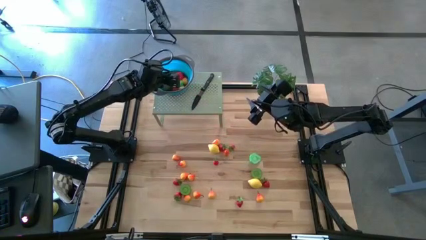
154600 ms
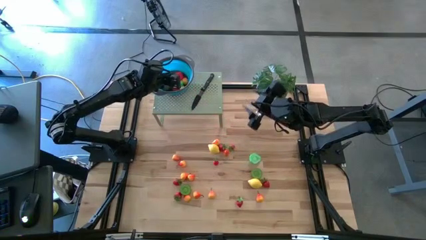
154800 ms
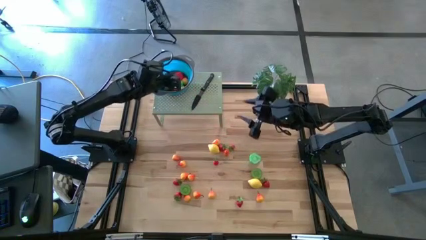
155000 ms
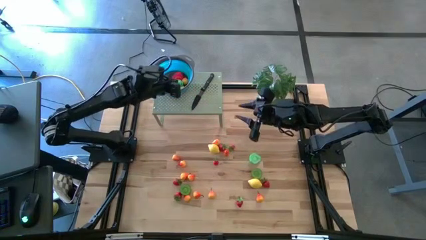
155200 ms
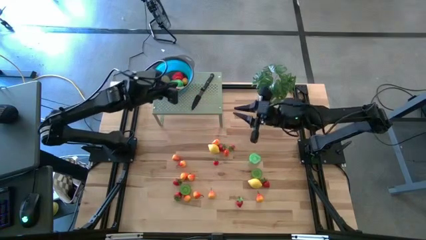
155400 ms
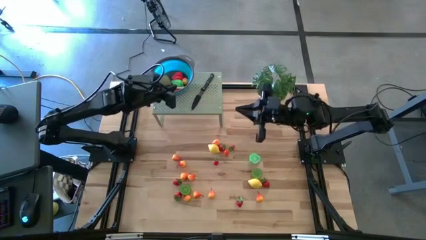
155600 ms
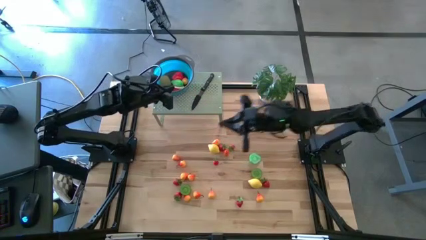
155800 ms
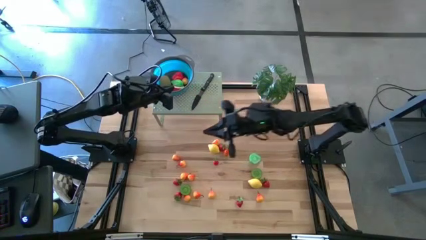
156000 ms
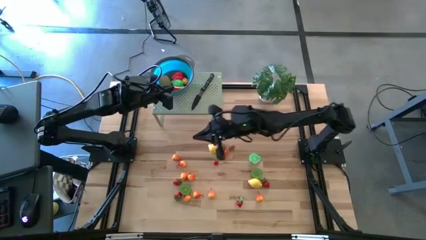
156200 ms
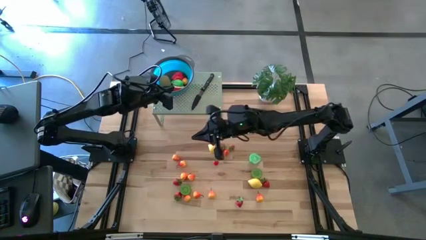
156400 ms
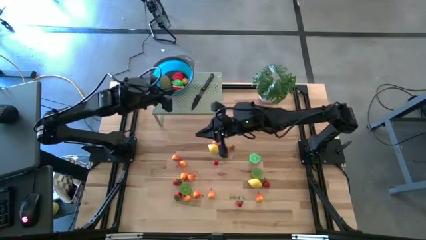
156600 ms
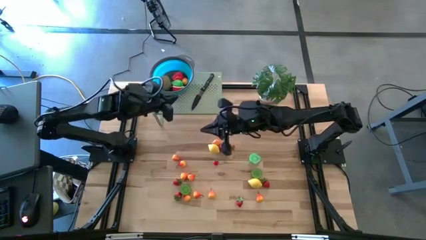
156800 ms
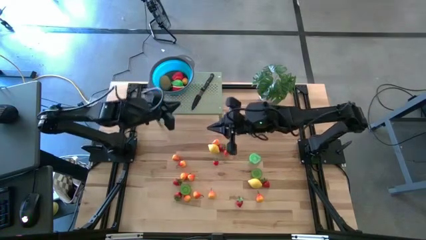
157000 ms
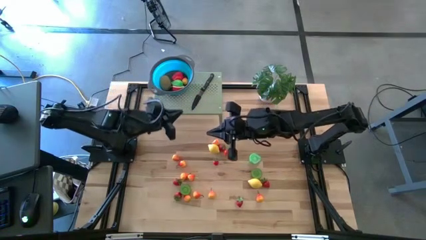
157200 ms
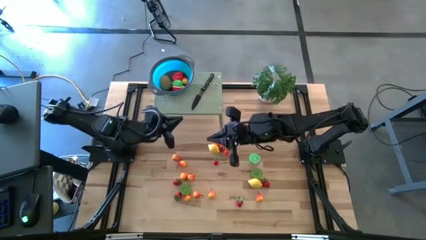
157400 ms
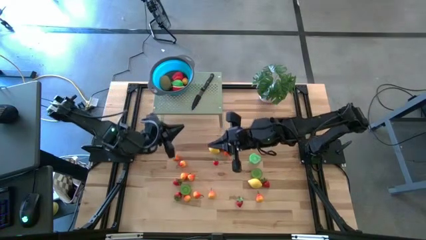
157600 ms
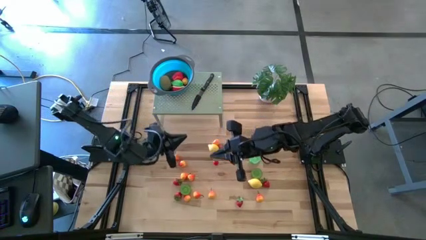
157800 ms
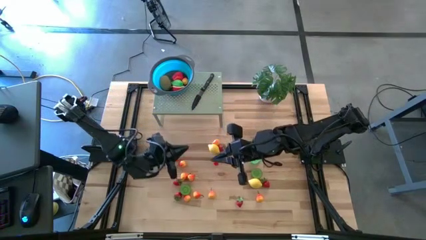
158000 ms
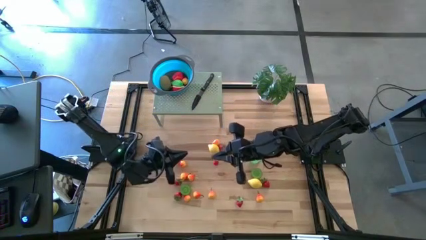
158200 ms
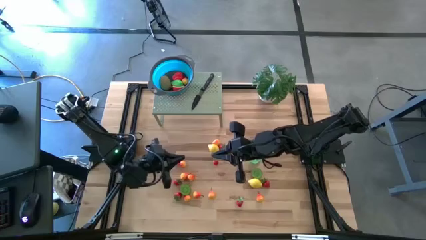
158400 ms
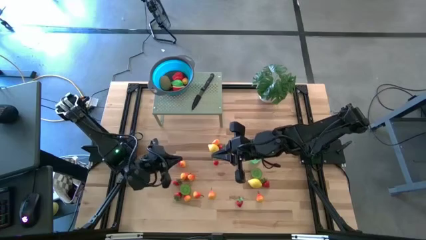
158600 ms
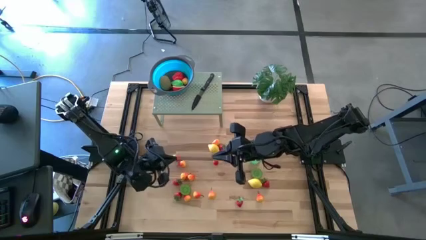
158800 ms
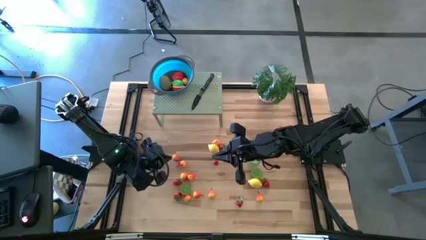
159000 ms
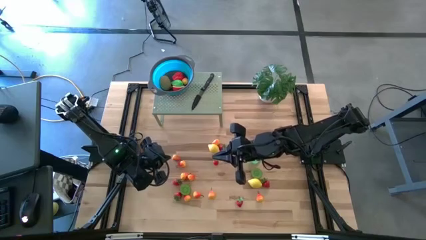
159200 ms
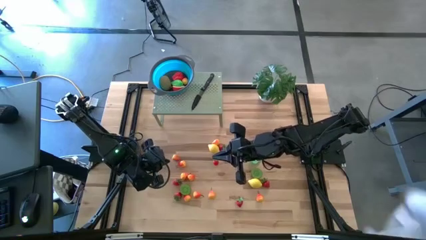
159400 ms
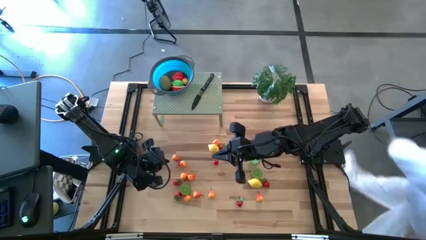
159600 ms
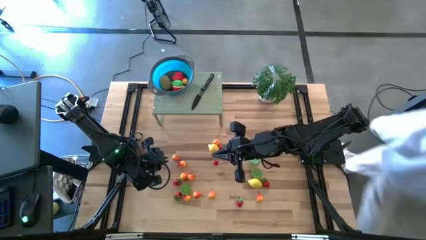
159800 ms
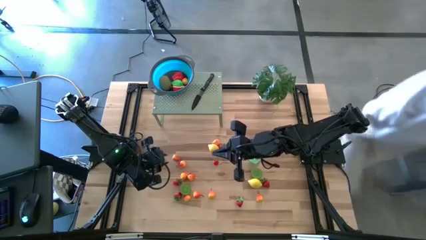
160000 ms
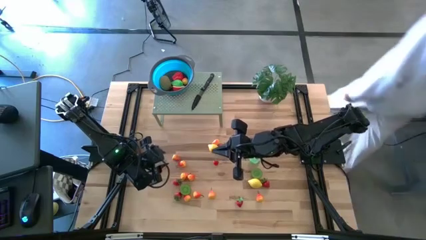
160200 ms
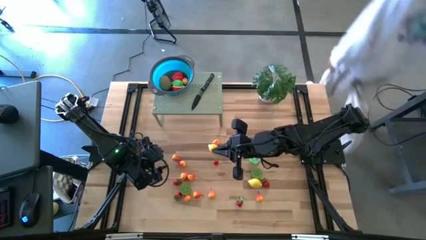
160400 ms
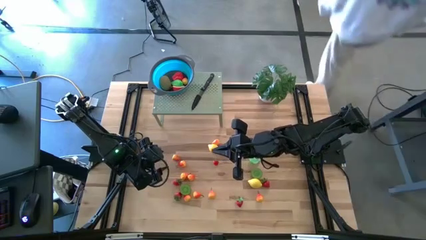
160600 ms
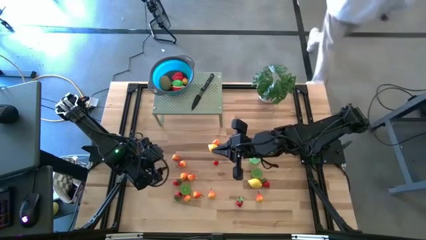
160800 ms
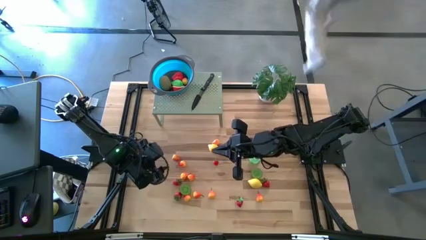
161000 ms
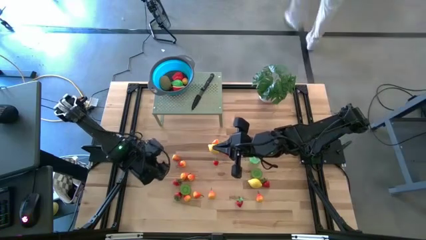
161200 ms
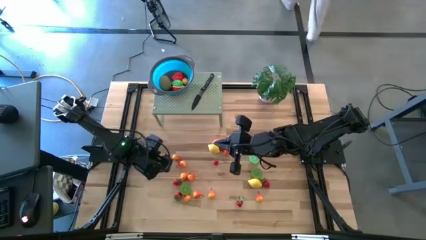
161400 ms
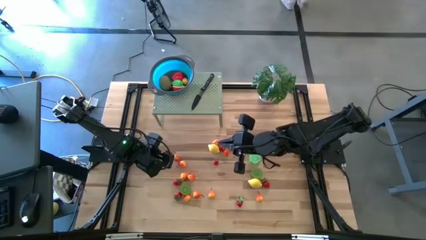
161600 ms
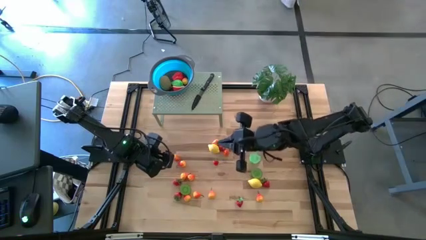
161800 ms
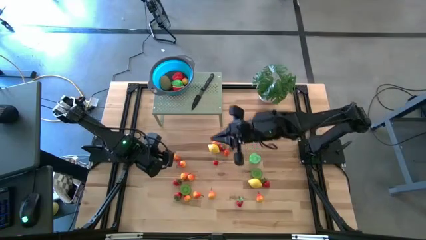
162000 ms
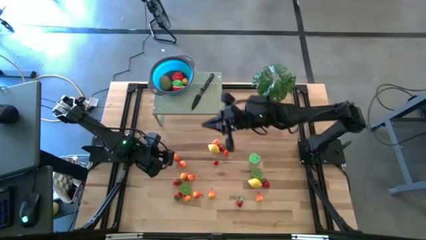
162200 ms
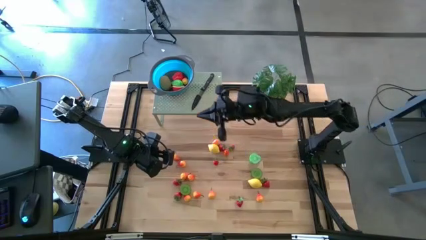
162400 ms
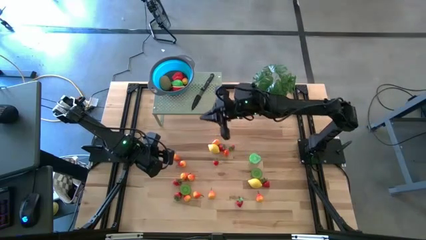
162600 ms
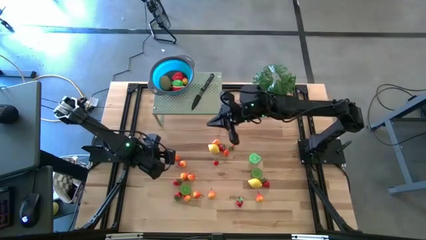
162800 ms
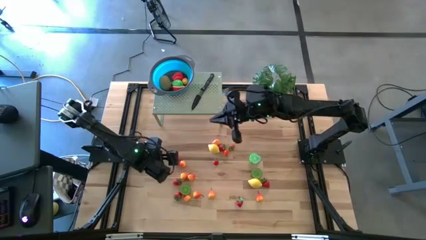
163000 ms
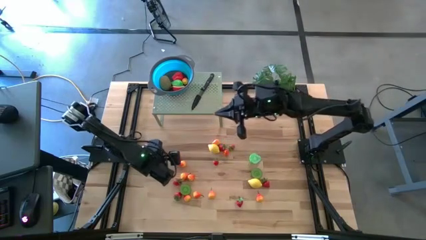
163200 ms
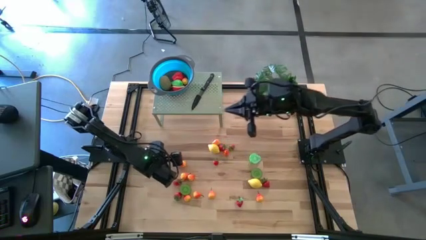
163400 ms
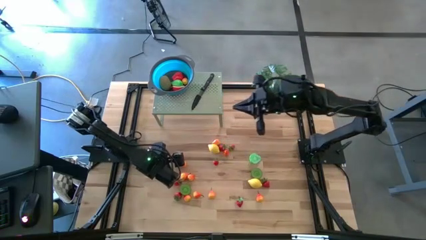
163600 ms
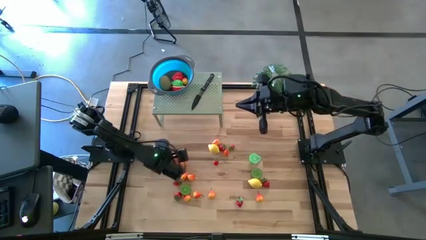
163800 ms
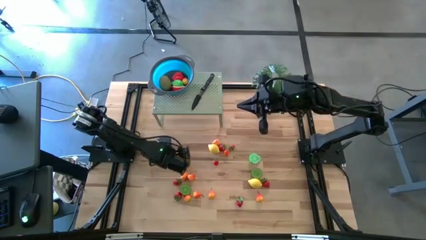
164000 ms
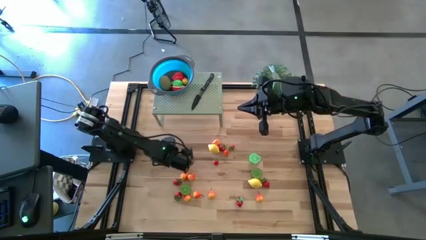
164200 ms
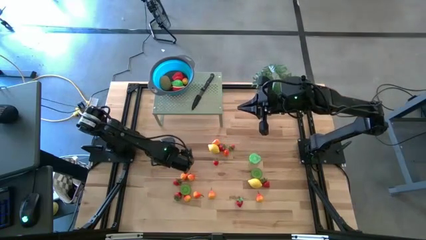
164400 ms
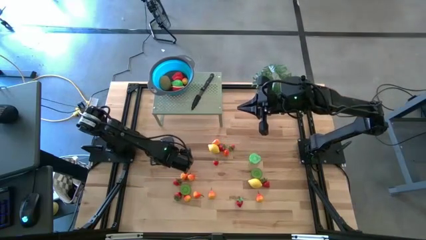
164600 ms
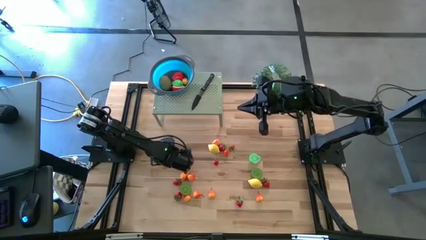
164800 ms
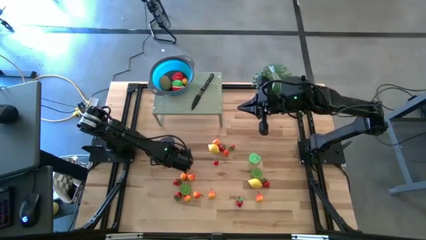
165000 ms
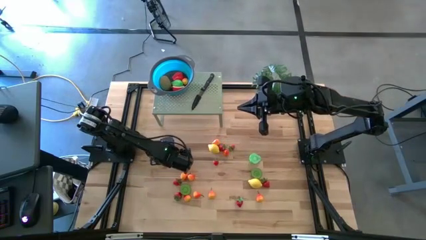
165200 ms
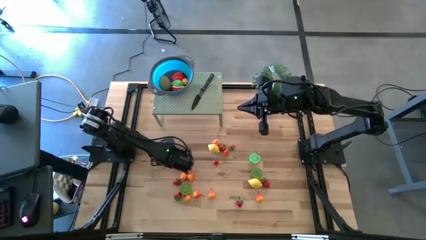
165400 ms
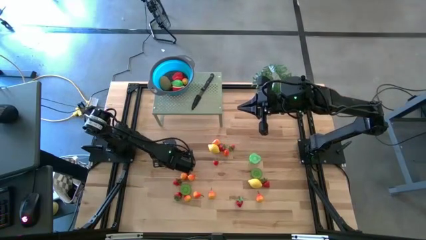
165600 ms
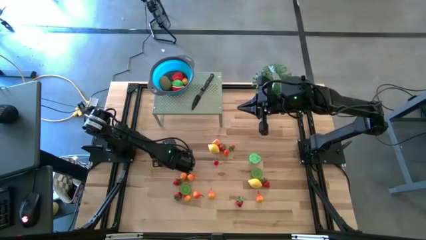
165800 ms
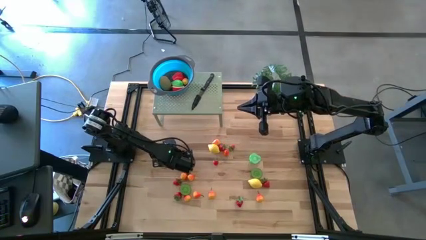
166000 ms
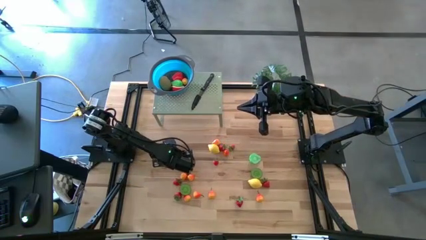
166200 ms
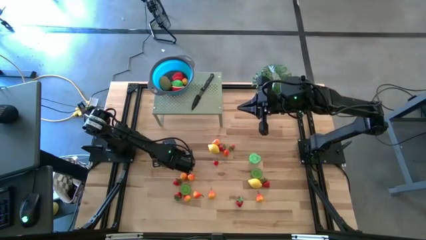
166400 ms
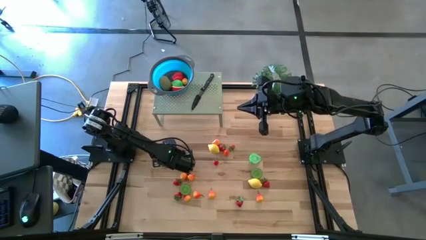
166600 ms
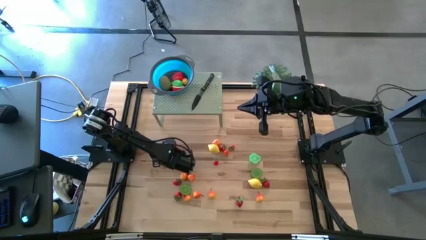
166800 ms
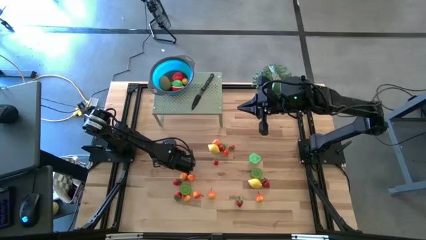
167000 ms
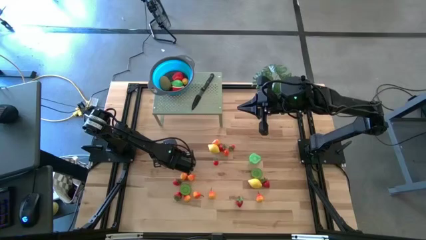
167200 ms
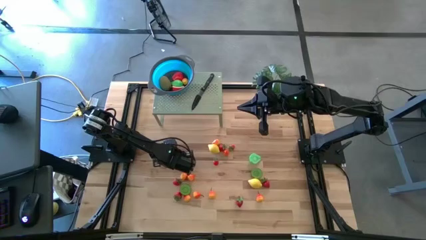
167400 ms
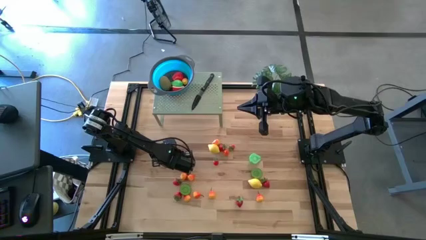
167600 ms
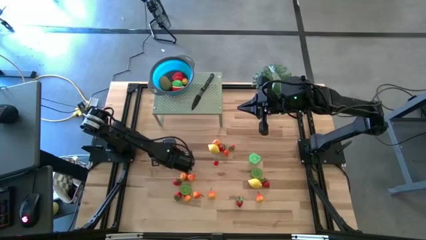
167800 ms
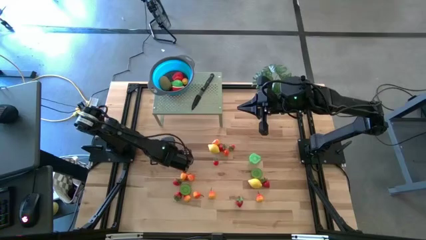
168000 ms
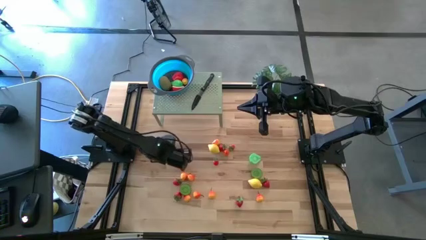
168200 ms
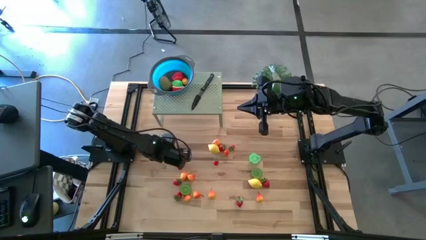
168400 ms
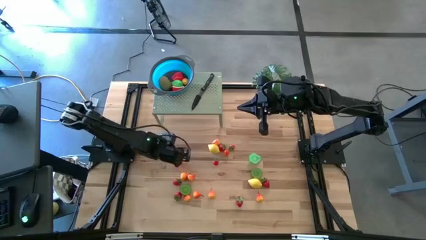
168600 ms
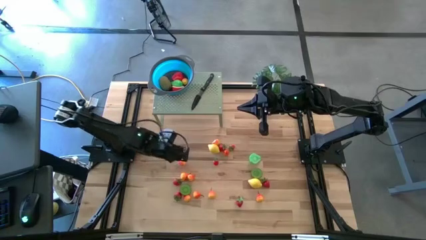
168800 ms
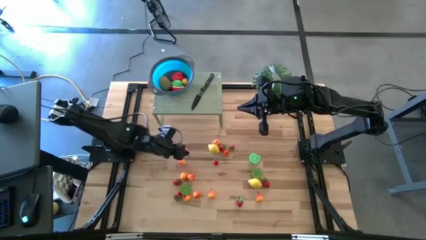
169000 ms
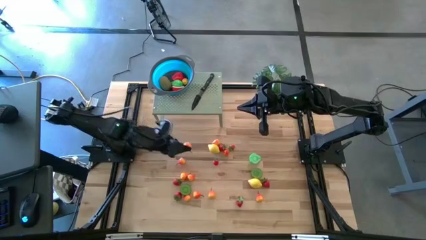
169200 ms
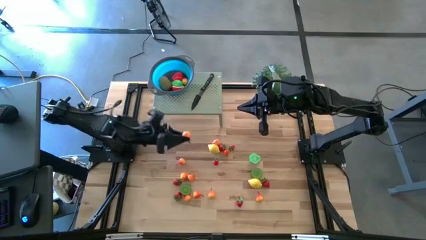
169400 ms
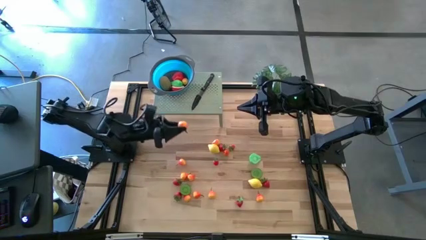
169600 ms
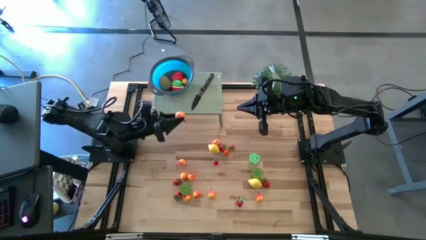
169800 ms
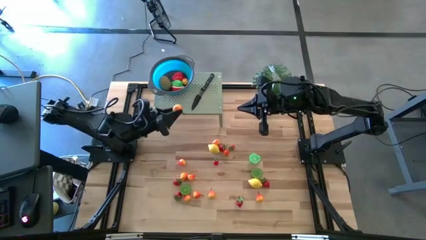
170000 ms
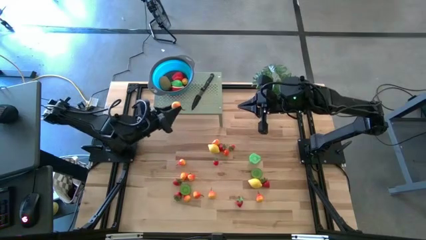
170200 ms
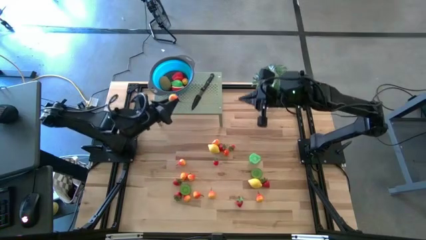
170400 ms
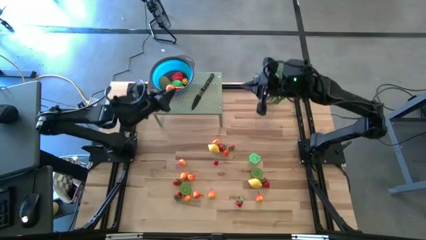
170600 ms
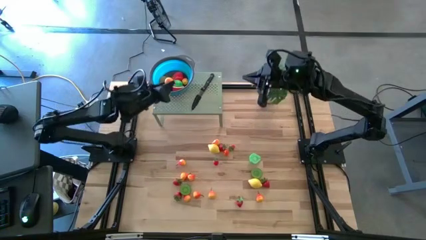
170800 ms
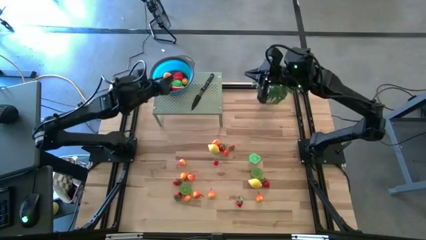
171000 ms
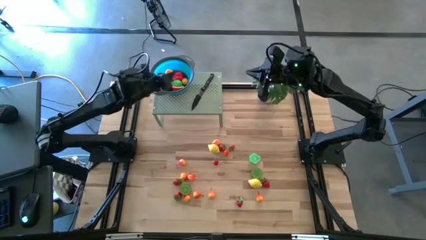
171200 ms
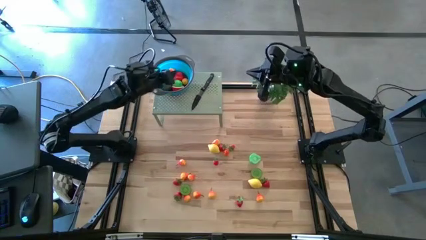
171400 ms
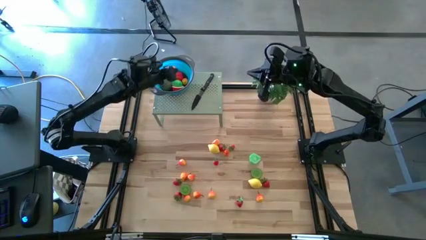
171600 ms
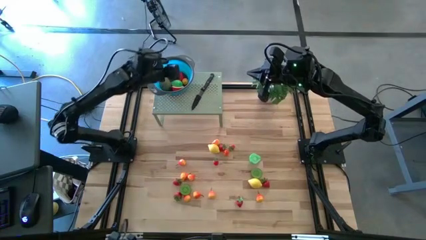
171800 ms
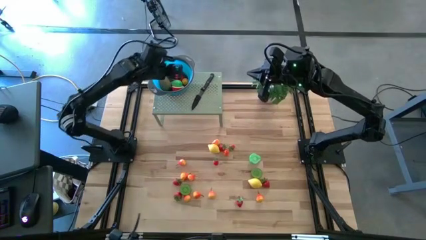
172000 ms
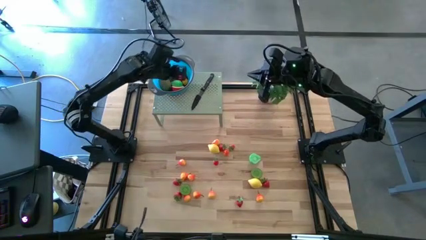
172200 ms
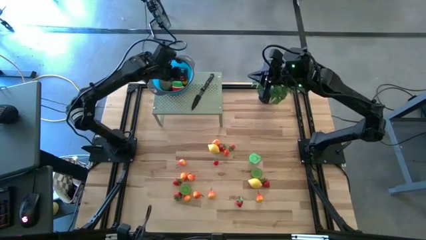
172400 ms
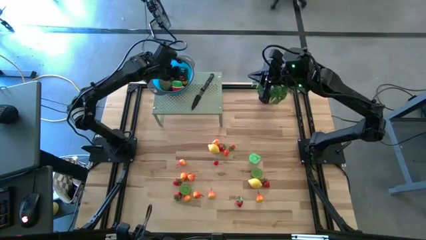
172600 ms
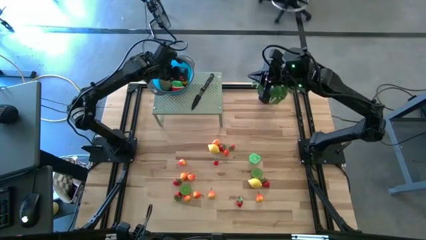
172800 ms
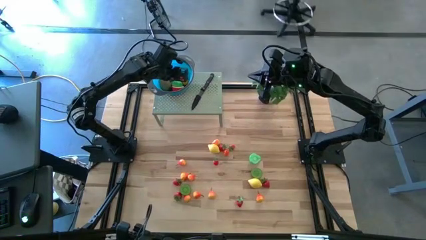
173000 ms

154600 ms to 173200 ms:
Task: Pick & Place Fruit
Put the orange pear into the strainer bowl on the shelf
